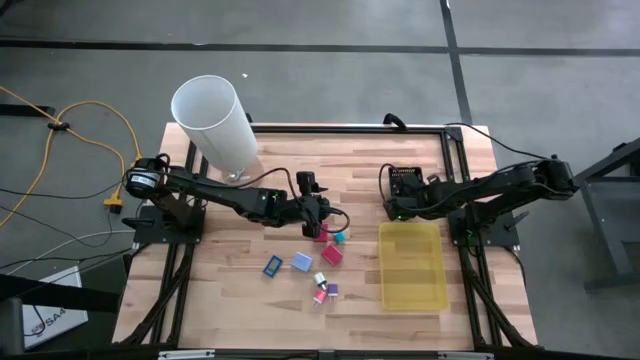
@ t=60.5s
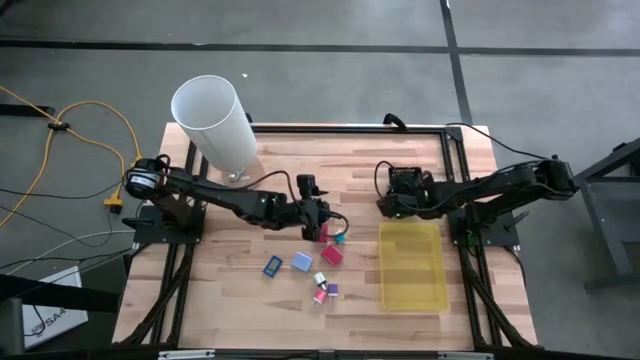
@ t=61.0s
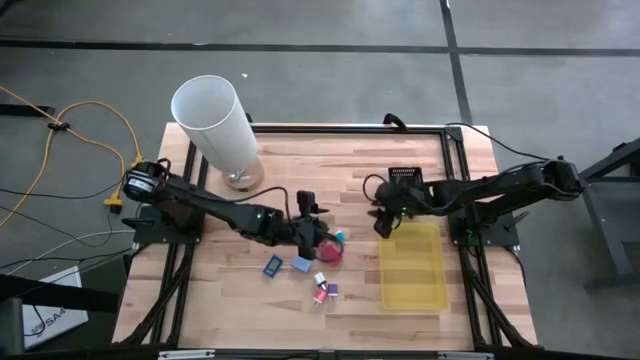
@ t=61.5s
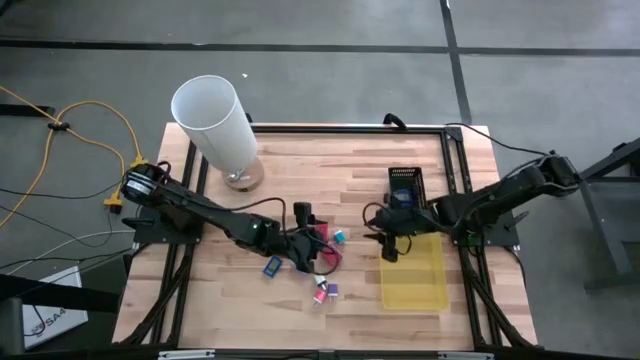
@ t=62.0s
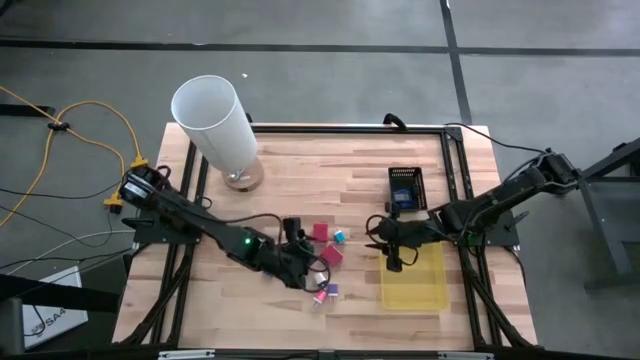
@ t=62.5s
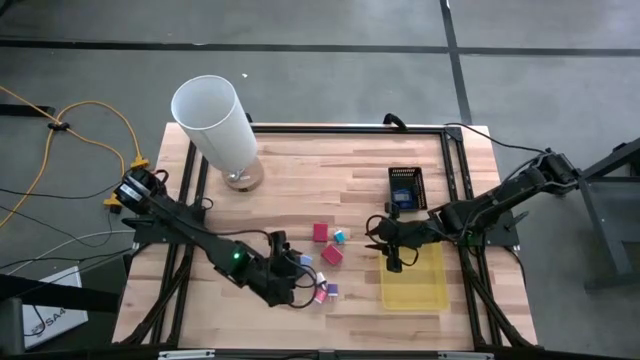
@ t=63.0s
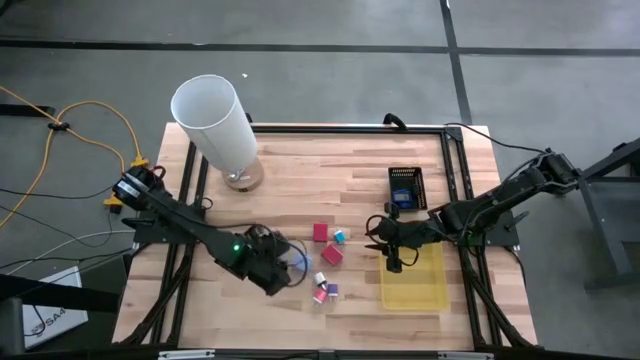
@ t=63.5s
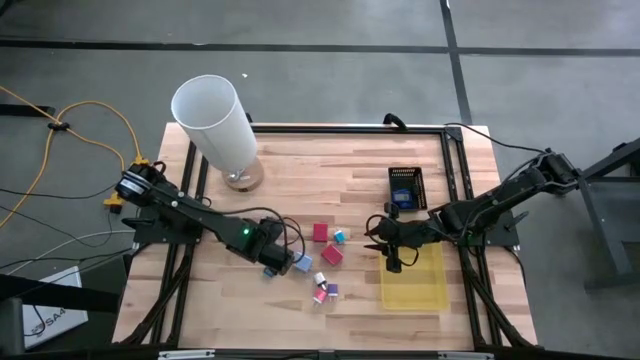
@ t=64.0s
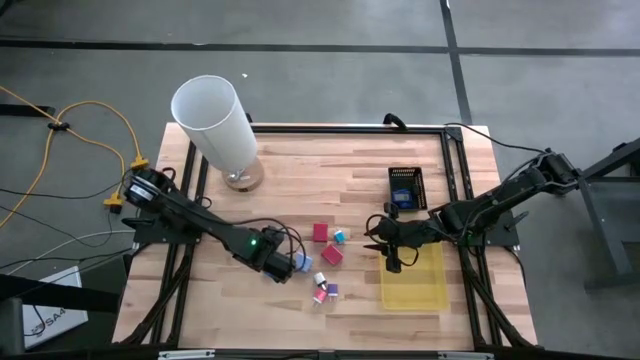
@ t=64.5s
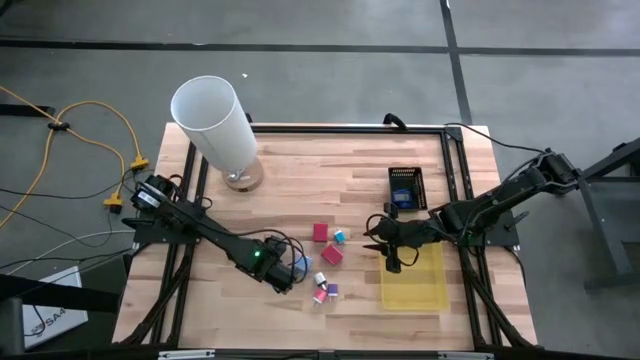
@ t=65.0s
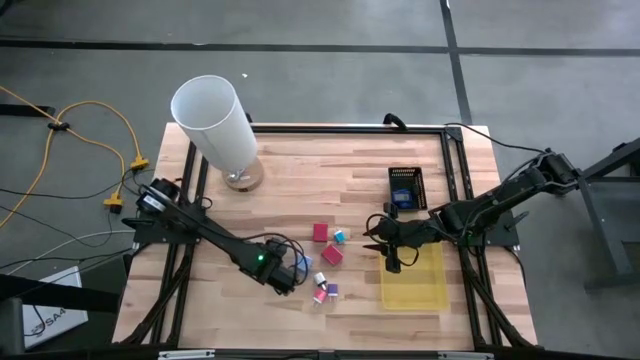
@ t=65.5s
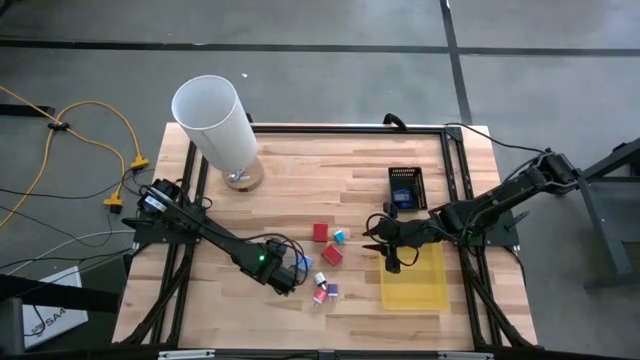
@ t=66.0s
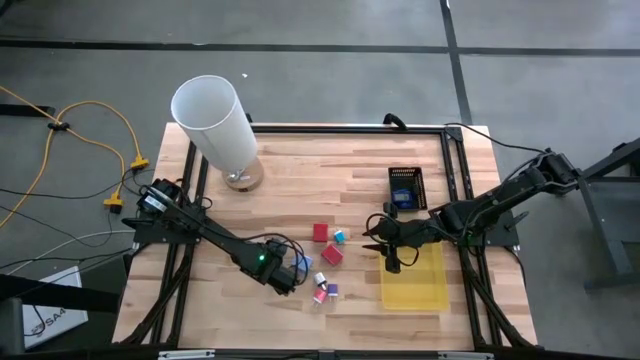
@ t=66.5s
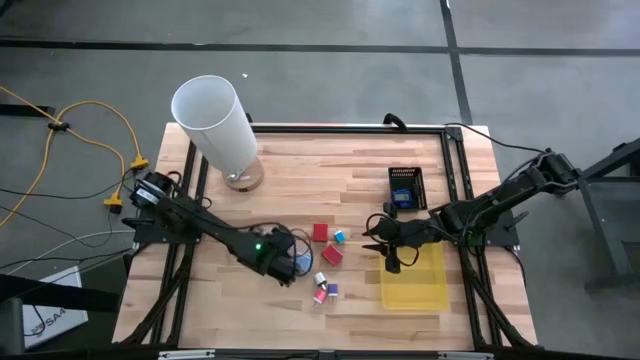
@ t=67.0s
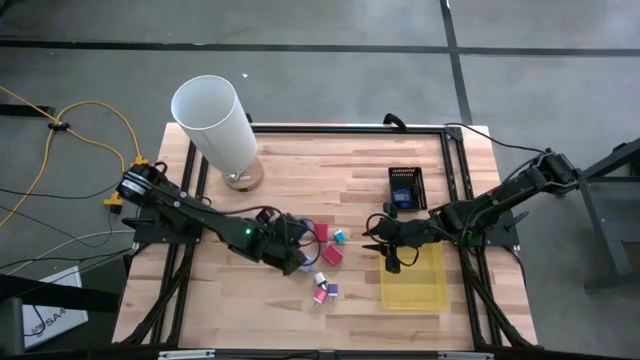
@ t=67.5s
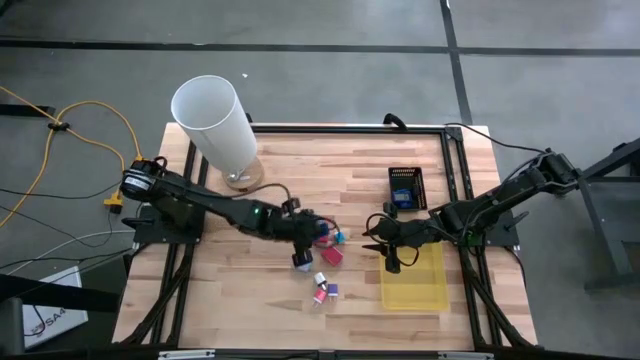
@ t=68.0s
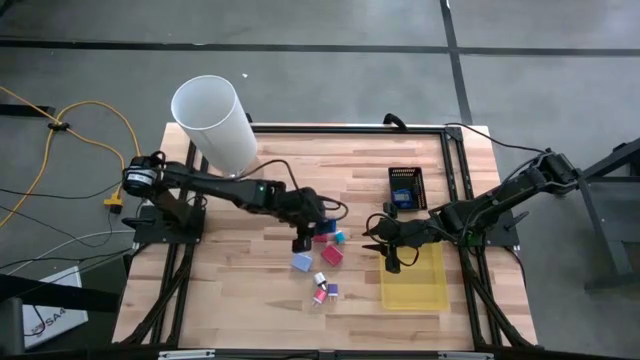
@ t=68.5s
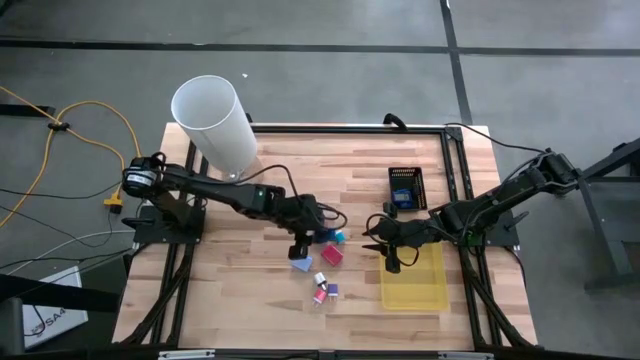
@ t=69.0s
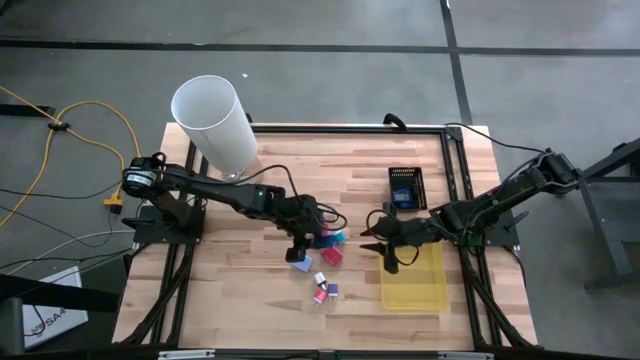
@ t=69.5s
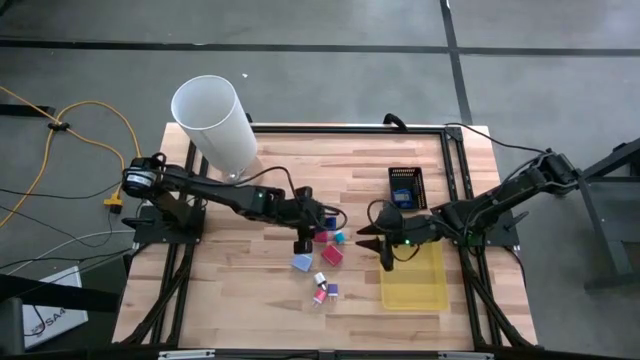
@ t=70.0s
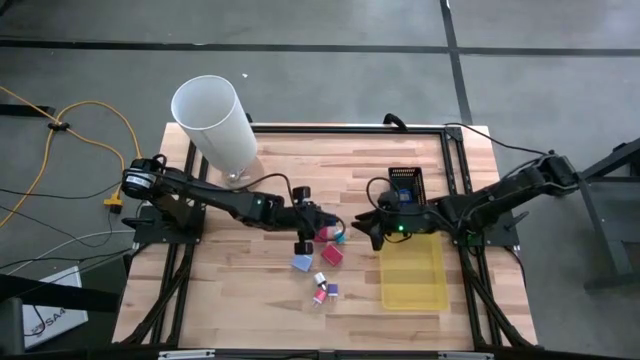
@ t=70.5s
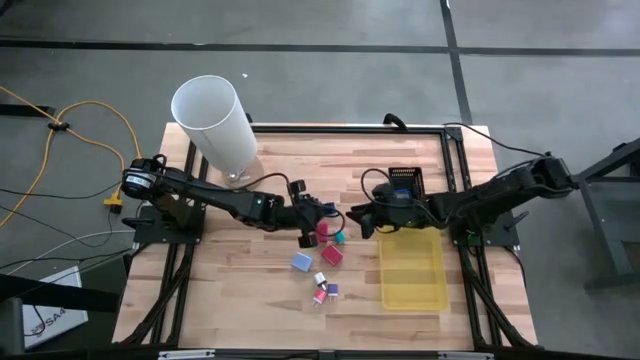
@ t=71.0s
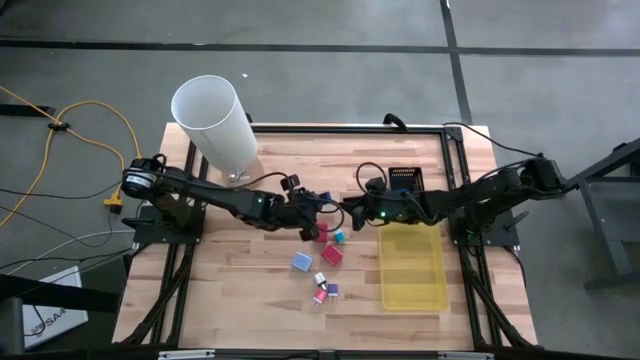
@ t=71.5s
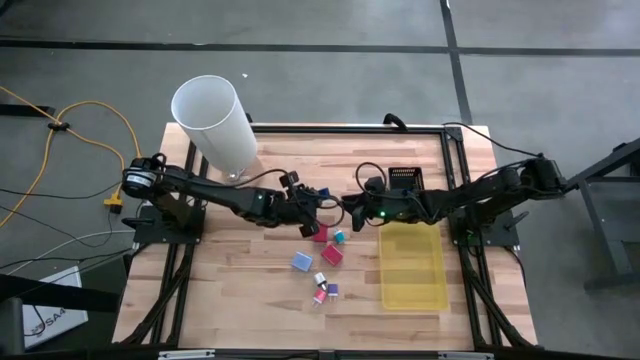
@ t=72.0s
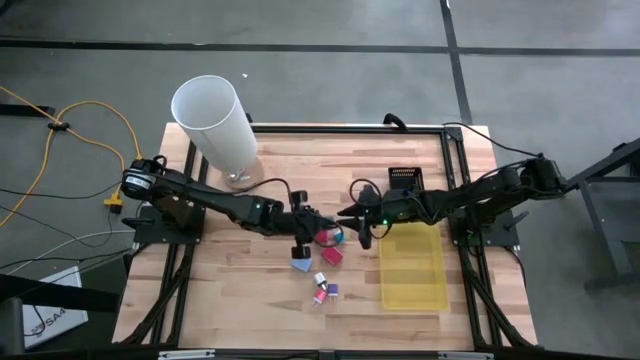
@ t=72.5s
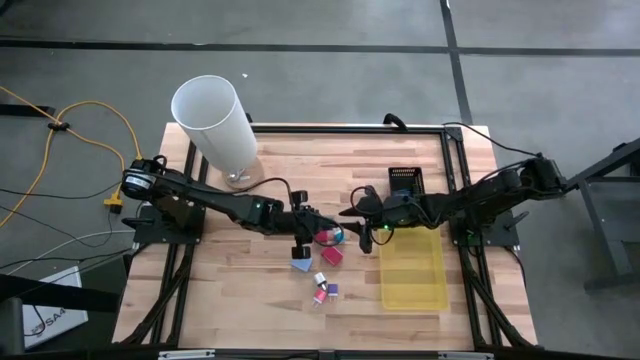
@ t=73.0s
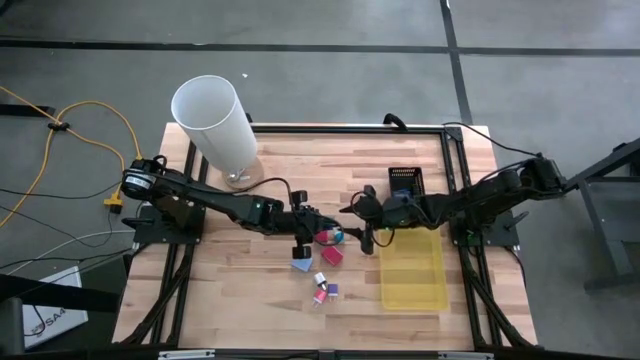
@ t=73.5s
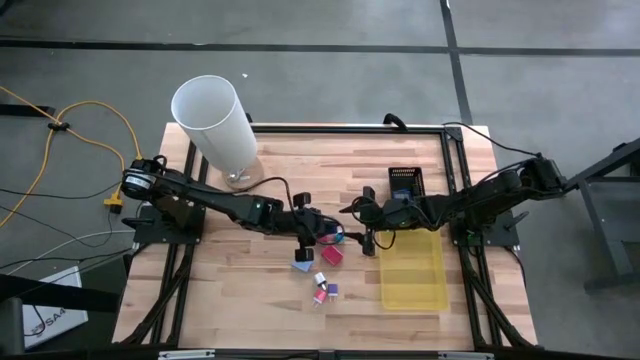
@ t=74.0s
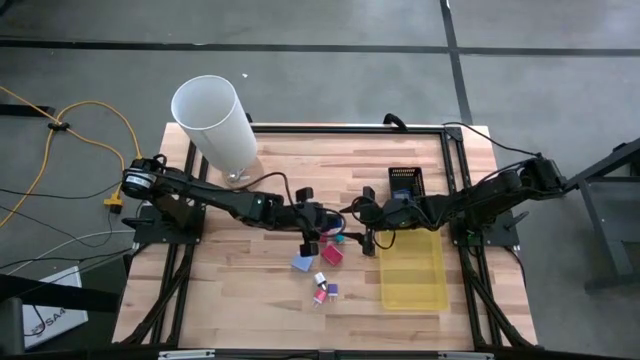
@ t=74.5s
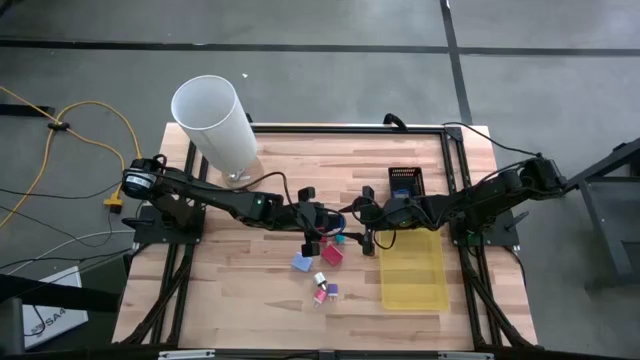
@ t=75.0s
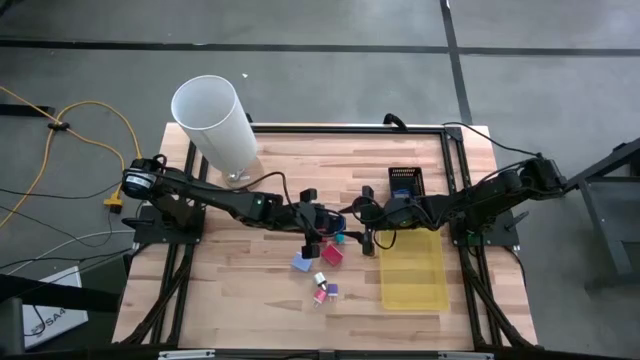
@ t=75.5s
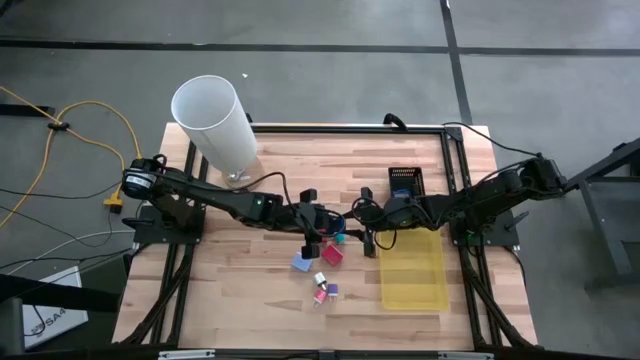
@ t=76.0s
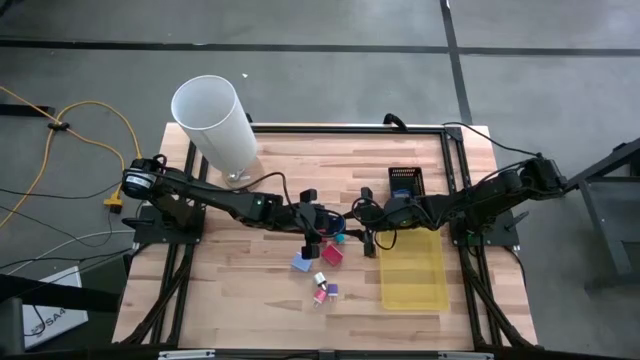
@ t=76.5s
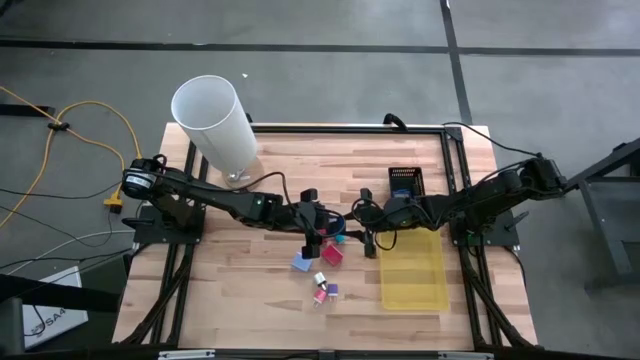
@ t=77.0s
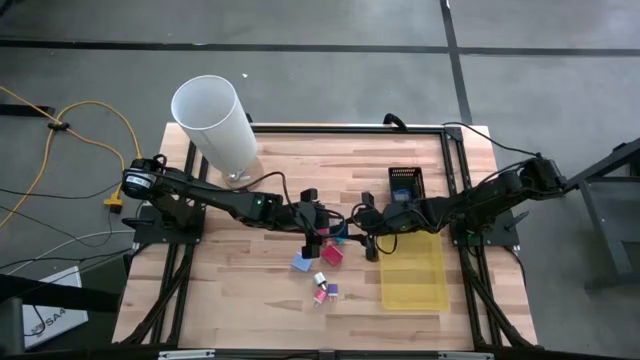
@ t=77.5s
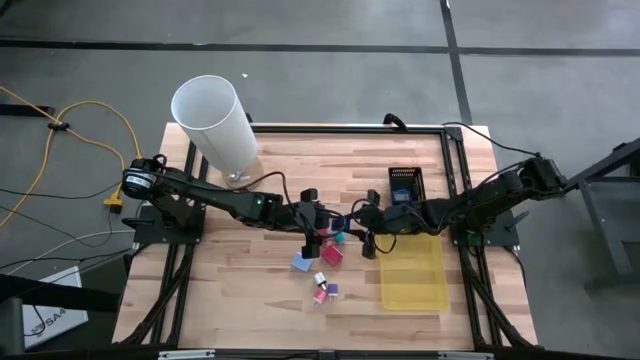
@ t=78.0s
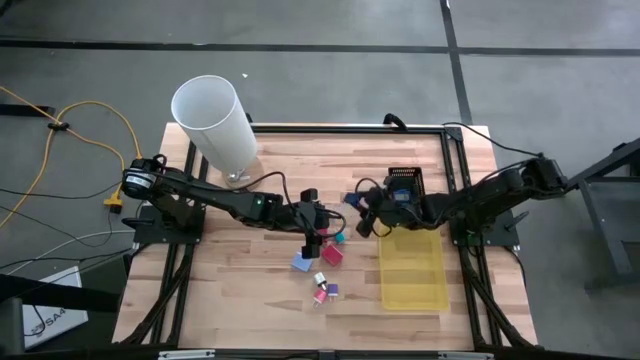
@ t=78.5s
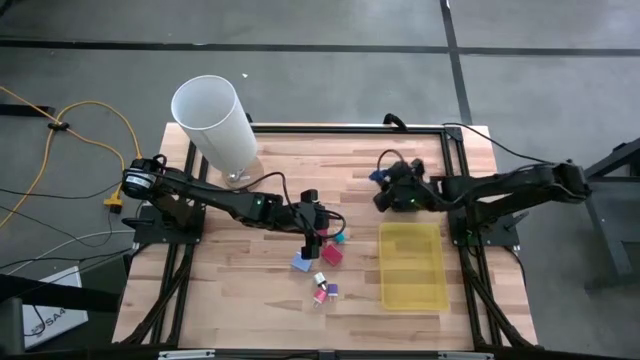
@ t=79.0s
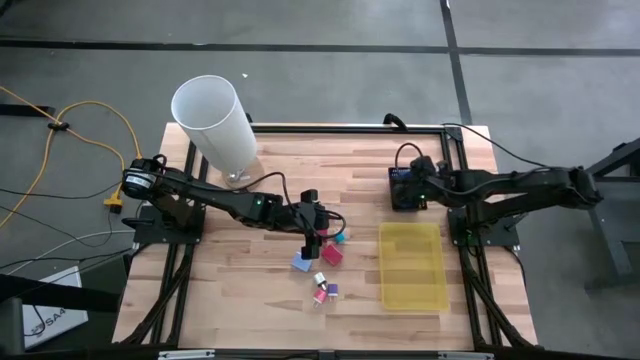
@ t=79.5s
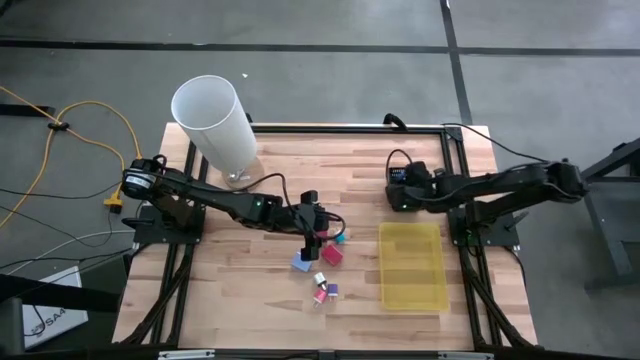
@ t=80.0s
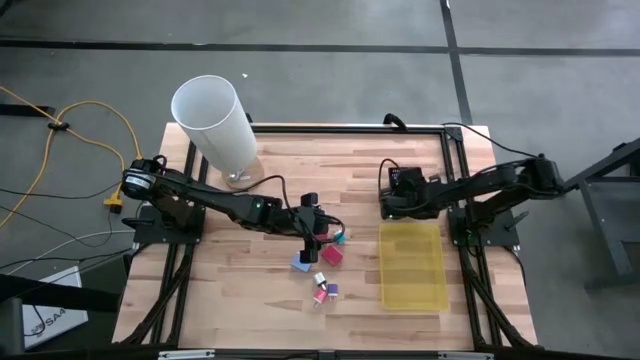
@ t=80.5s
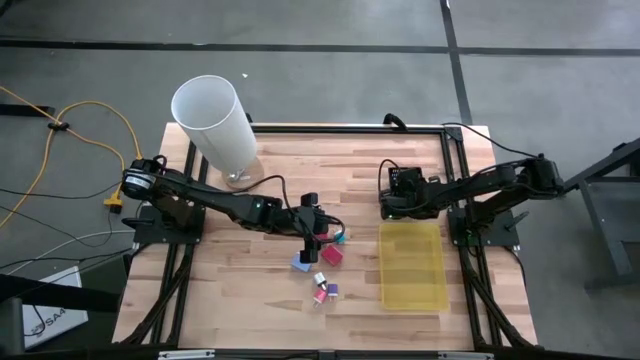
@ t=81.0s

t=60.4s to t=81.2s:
Task: Pick & Place Office items
Put the blue digital clock into the black bin

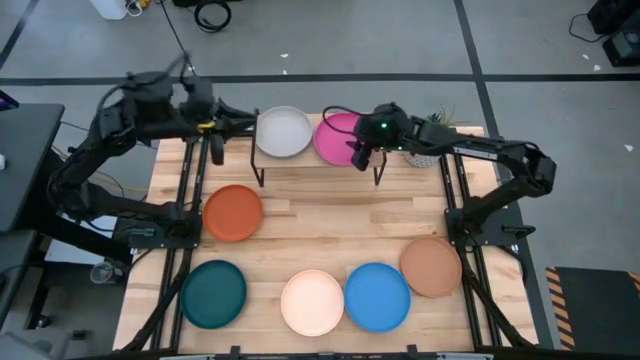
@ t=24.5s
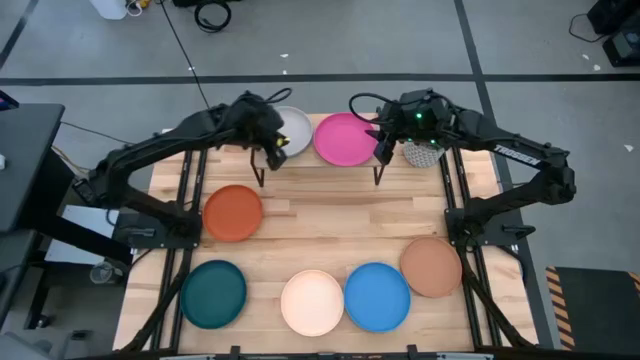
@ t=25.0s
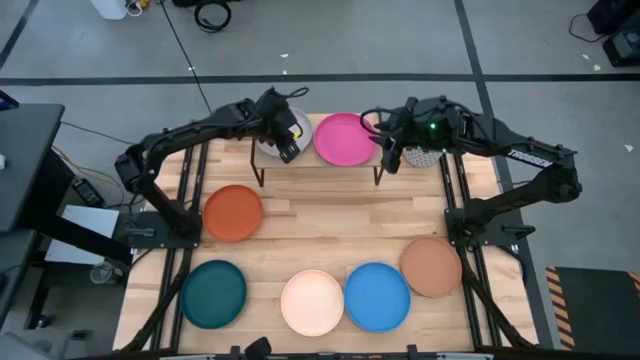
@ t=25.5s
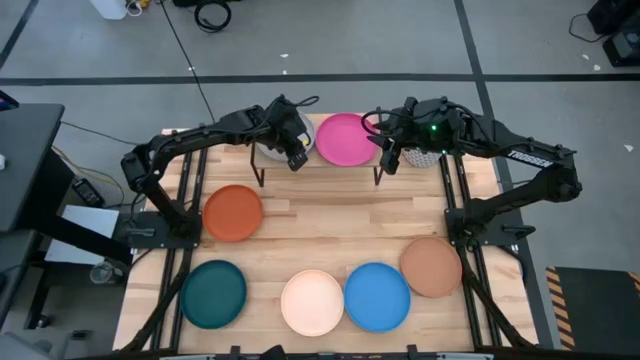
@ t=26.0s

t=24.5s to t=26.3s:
Task: Place and stack plates onto a shelf
Adjust the gray plate on the shelf
